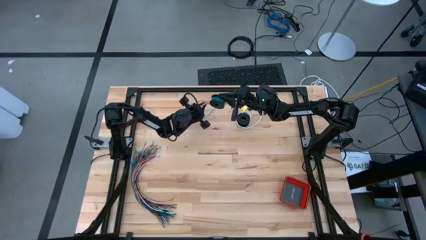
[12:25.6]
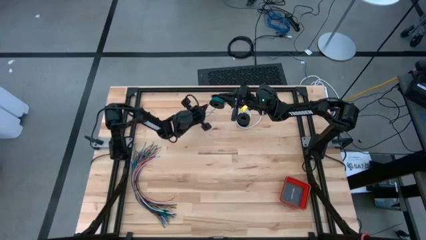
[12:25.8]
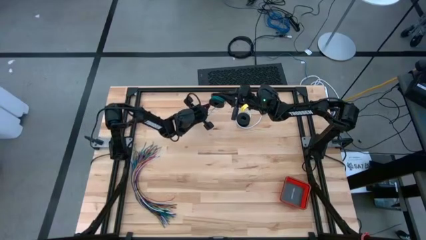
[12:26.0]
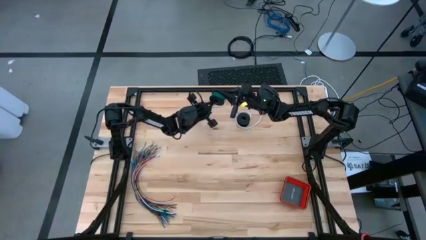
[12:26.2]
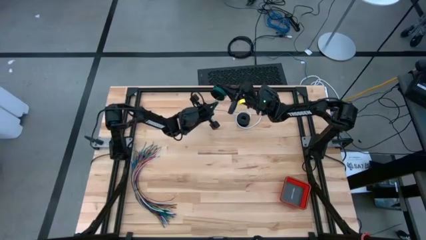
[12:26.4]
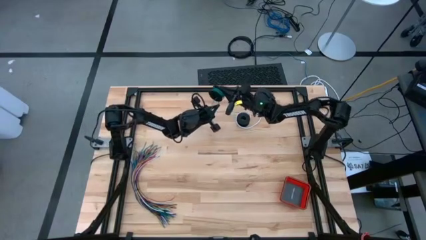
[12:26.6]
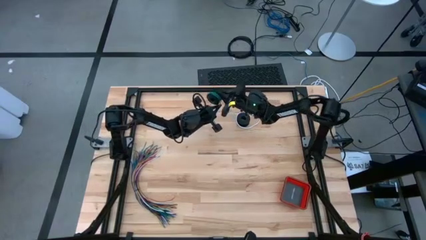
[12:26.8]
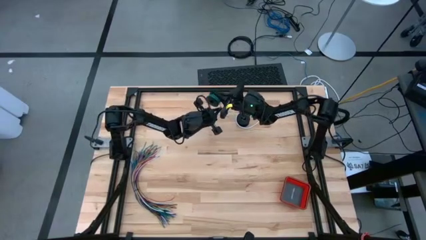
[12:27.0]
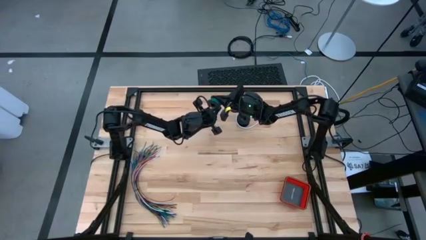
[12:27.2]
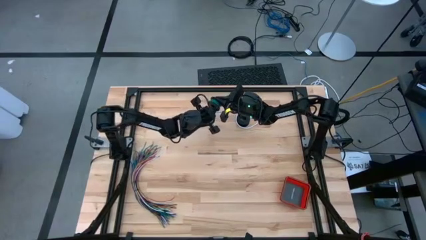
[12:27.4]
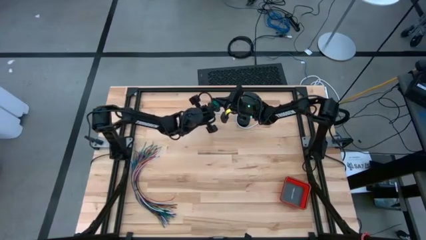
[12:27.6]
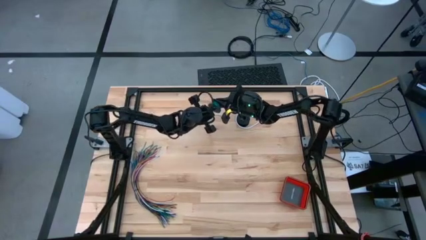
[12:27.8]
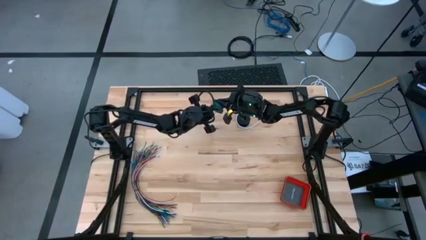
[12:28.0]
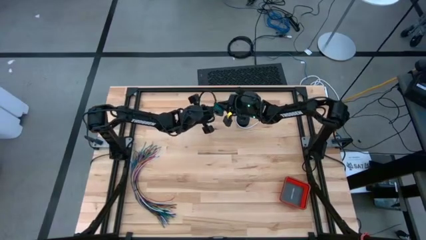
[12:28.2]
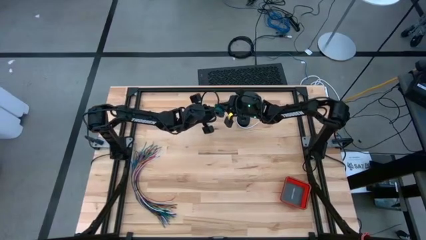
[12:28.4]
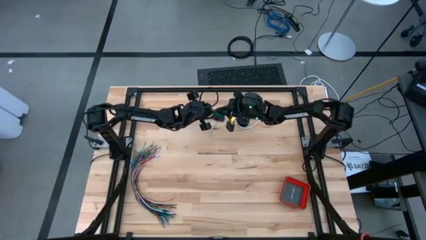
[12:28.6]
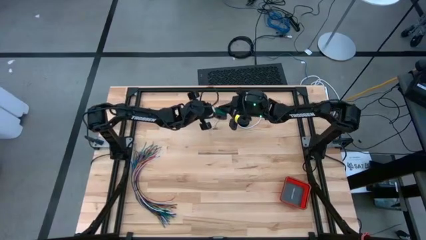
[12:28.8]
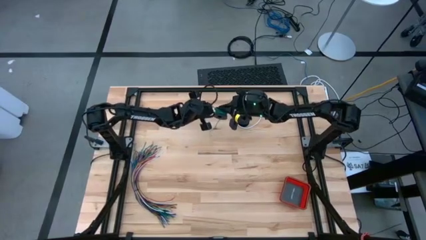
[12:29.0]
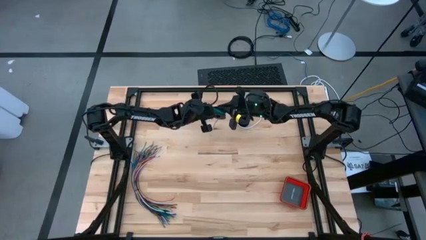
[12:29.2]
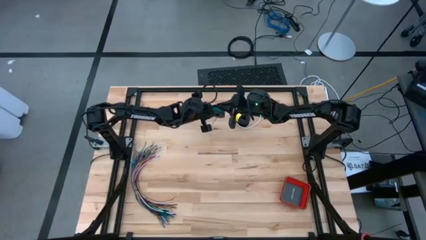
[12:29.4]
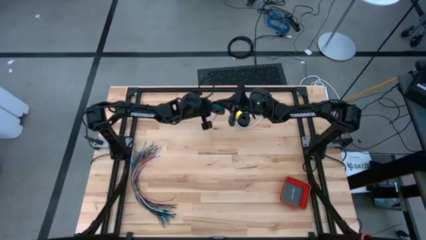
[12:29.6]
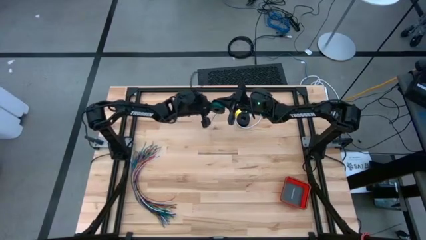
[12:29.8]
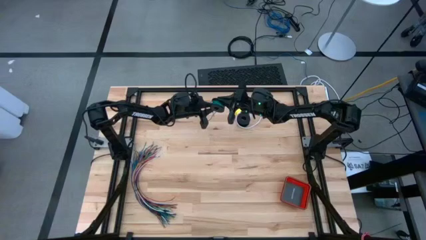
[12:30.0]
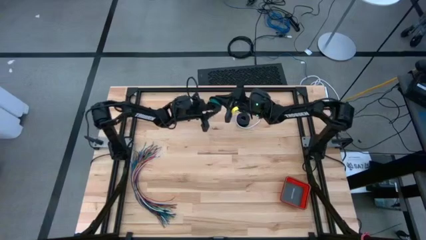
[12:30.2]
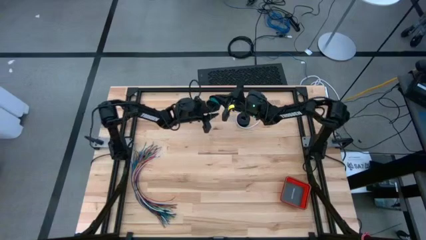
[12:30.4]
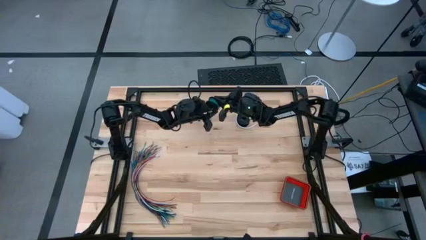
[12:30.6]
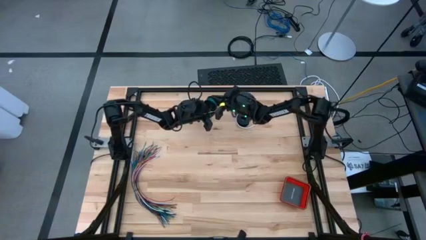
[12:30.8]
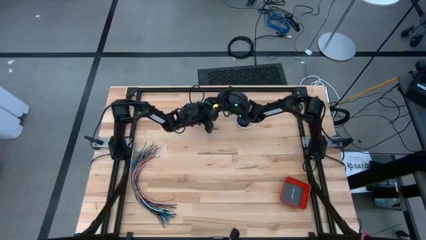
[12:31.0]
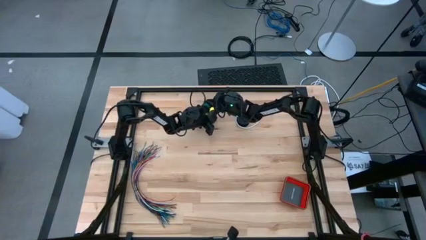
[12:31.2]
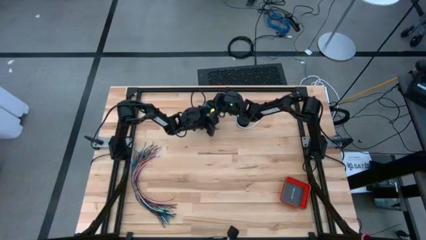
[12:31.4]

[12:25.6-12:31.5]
Task: Coil cords
Coil the green wire onto the spool

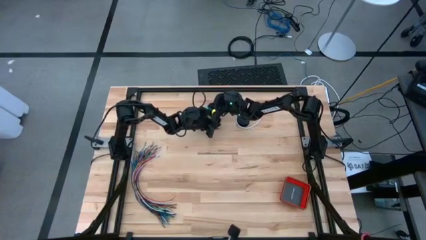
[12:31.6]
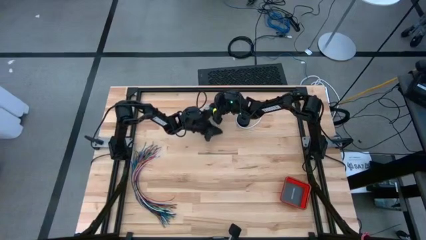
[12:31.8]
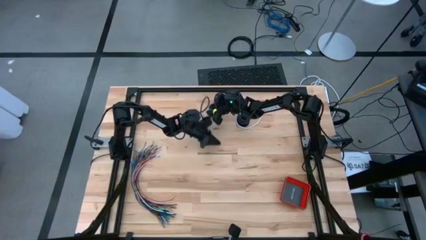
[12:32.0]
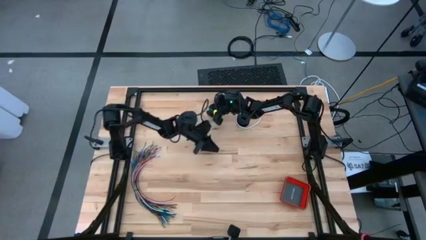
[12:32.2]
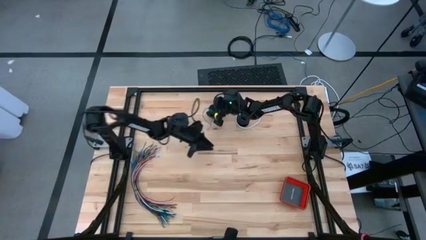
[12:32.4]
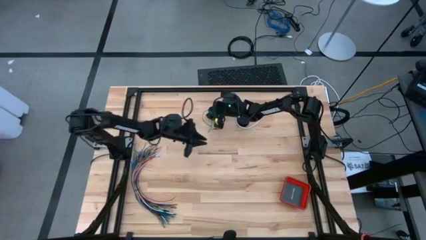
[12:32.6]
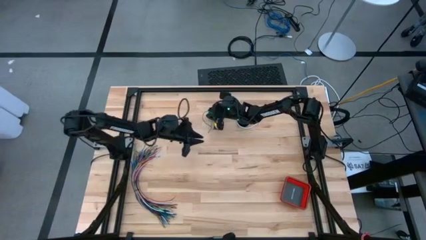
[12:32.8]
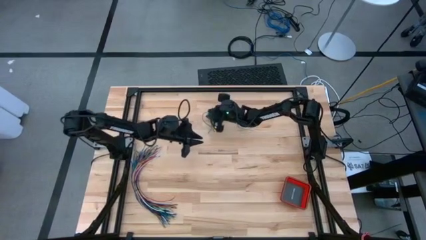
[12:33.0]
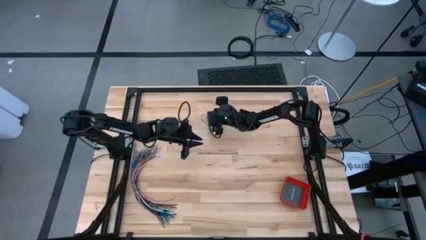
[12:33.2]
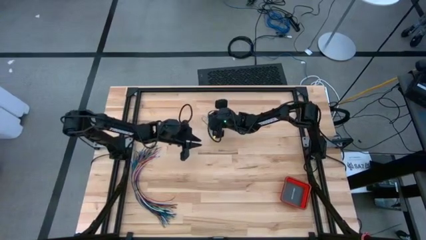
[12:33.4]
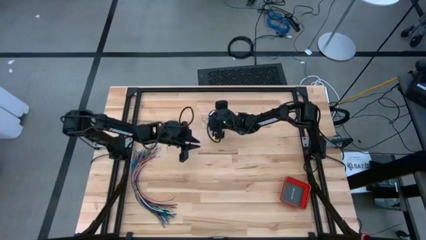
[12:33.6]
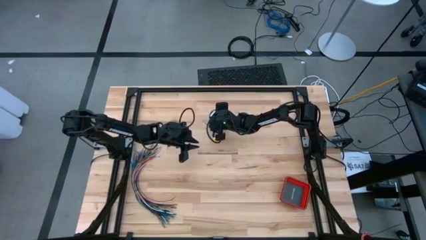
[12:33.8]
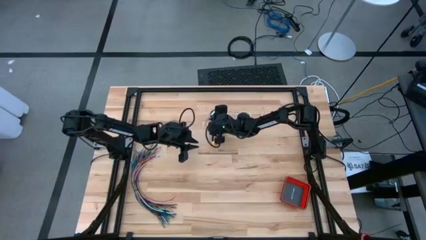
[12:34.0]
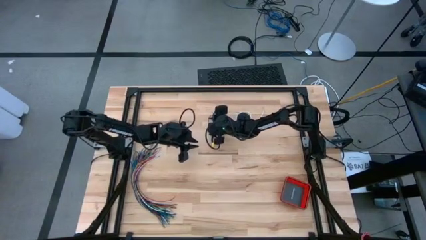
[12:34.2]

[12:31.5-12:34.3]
Put the spooled green wire on the table

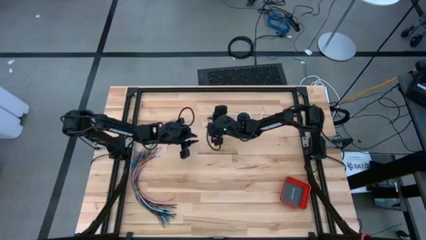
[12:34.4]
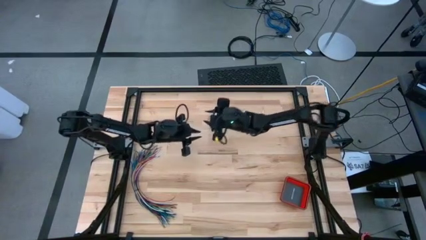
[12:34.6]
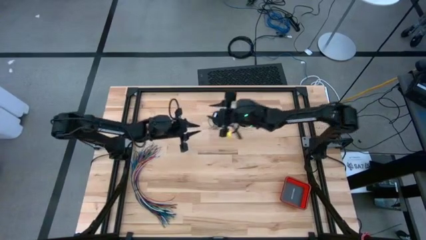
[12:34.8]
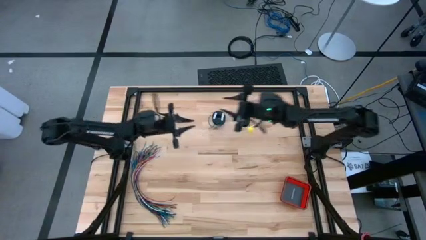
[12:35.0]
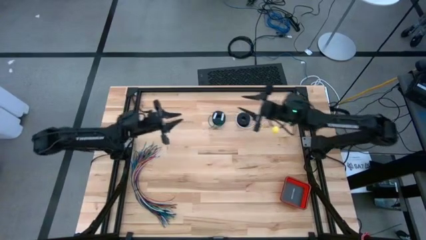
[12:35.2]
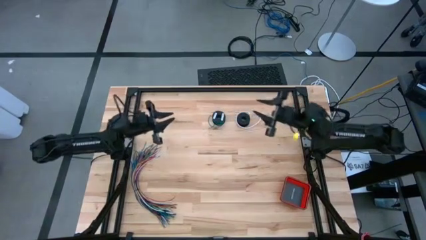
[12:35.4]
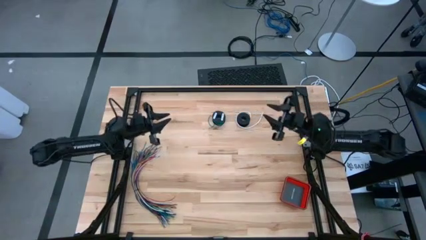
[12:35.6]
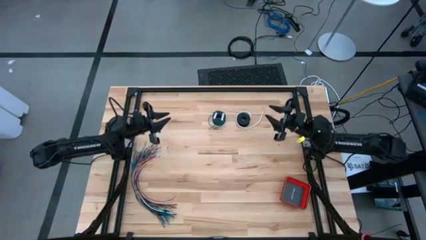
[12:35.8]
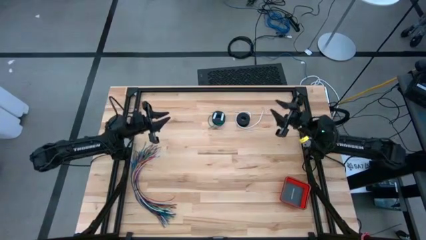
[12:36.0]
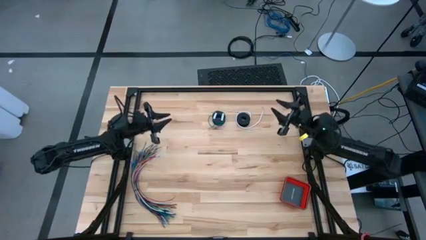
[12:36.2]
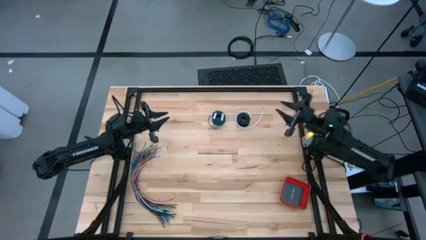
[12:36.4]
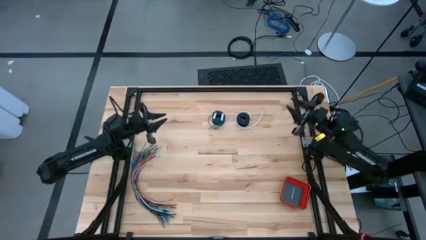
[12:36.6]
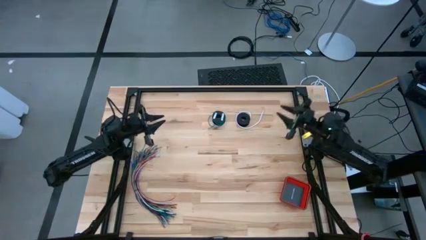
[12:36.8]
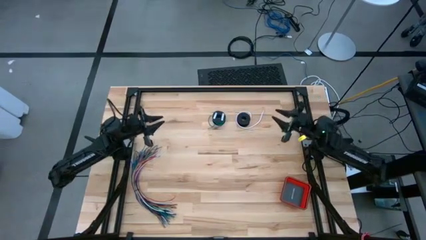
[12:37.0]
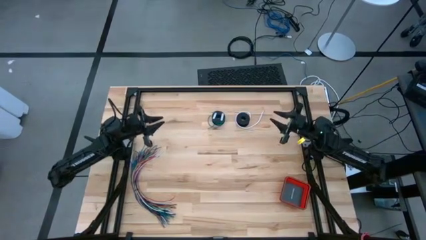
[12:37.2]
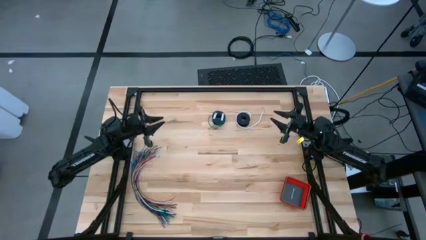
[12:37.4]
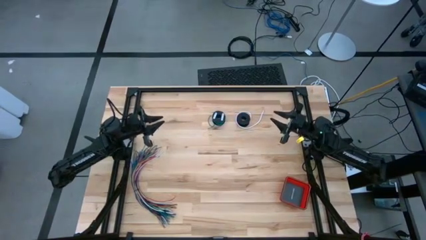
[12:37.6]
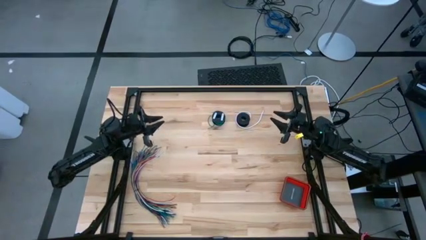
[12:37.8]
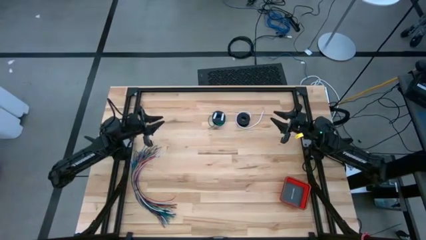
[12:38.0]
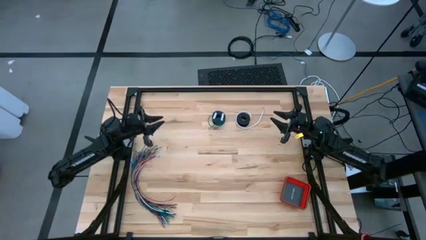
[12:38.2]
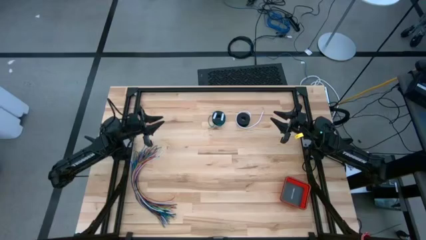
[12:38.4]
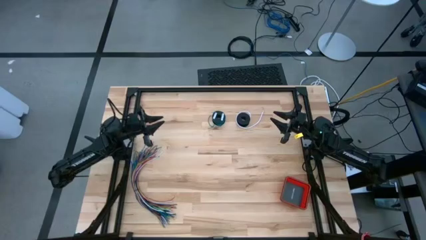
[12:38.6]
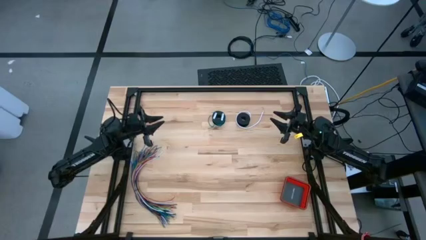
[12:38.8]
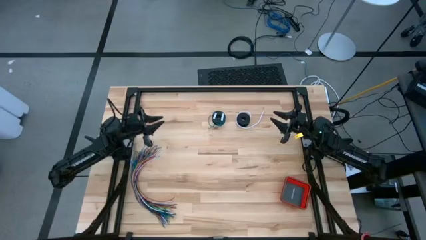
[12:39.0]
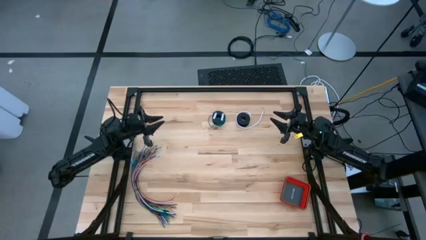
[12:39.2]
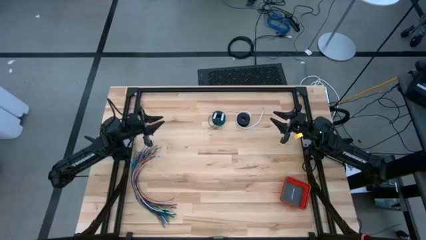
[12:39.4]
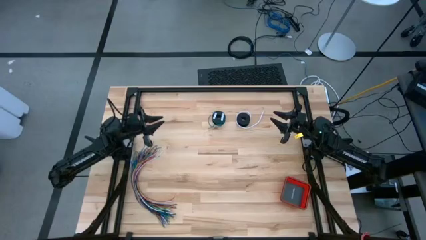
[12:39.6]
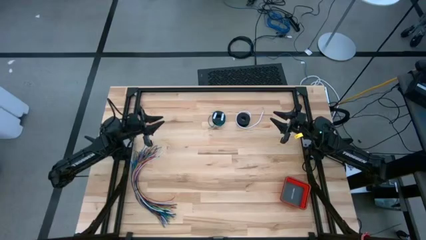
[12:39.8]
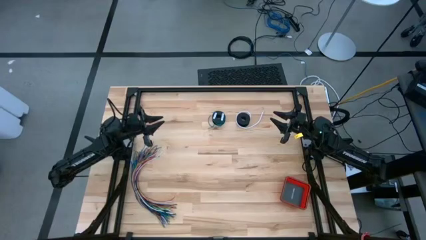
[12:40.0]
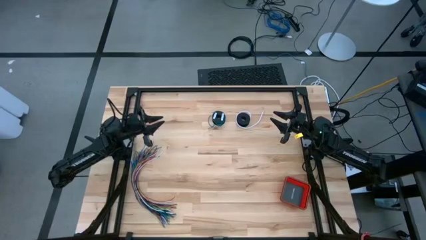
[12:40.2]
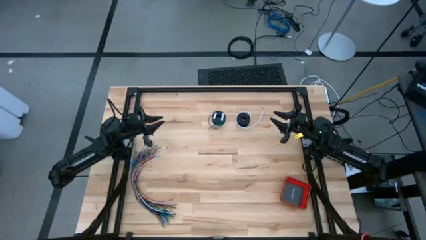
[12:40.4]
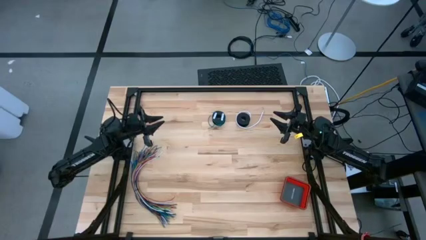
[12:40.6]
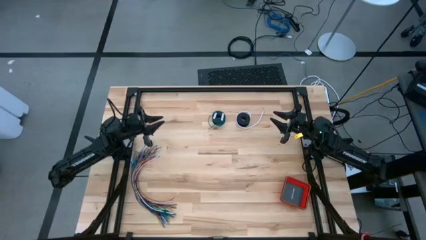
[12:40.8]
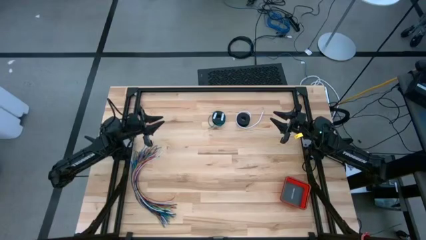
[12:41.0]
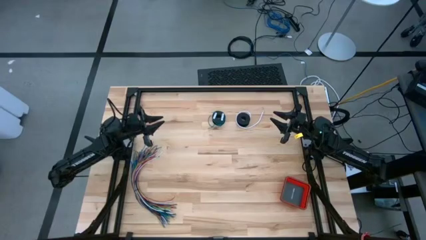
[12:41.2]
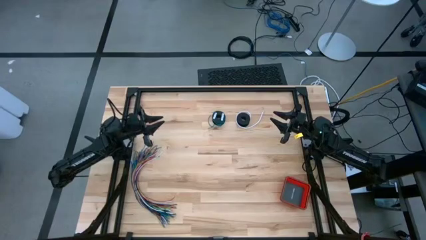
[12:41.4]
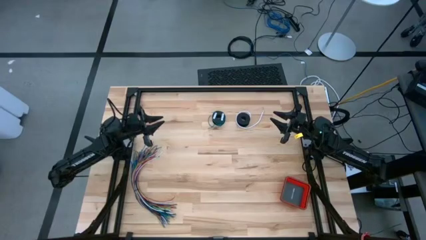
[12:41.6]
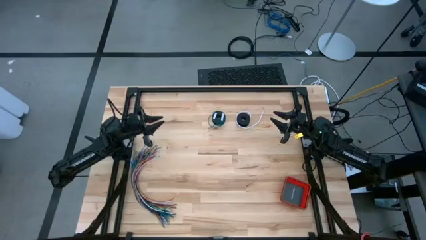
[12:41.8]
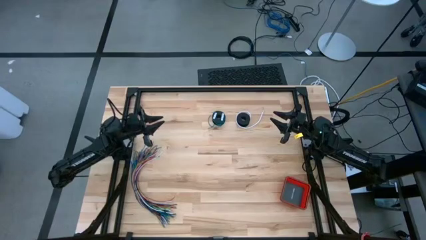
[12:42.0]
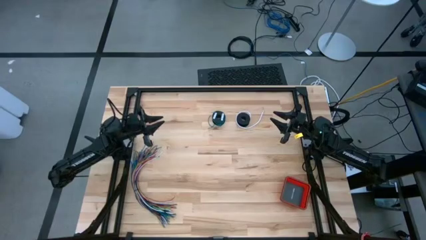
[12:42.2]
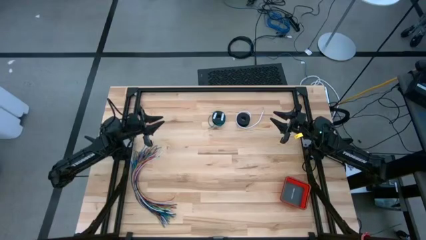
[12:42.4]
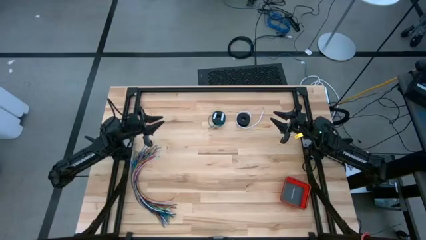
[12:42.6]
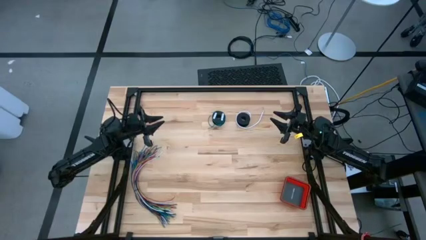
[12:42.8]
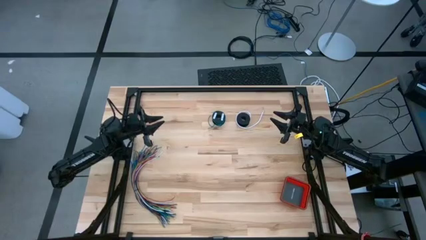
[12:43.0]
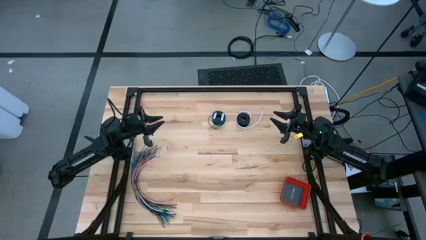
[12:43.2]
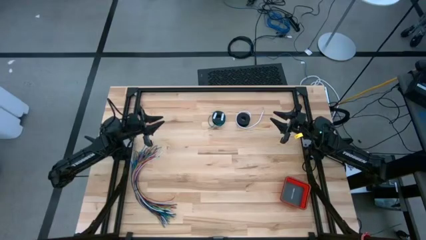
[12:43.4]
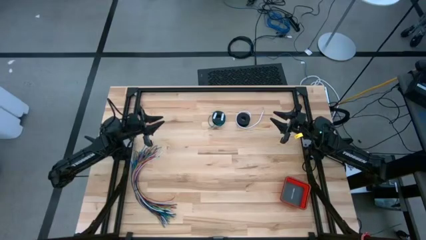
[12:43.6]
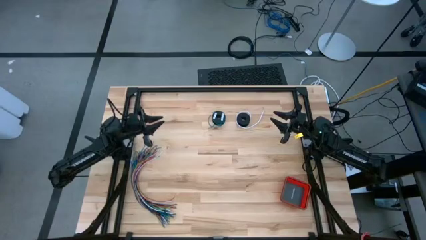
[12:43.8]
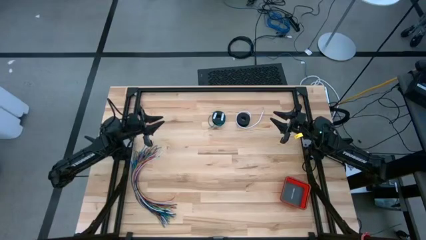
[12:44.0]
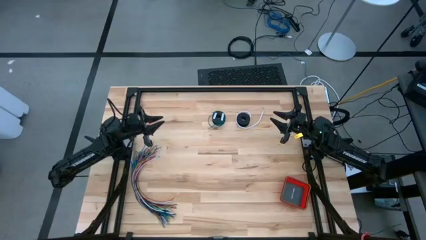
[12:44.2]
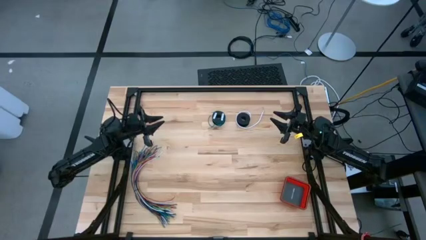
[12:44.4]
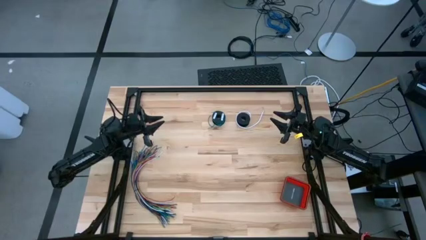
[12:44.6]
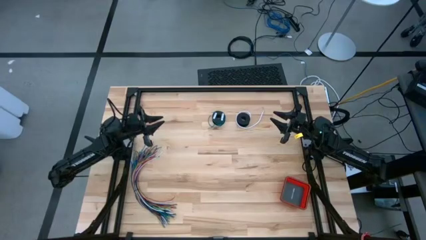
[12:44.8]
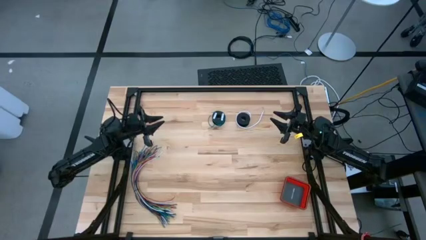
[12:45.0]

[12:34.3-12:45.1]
Return to Home Position
